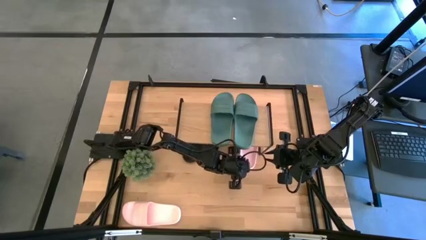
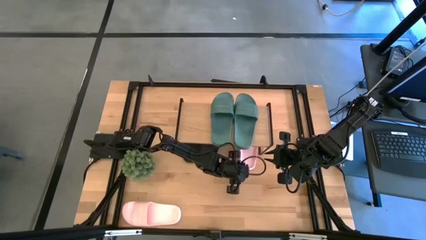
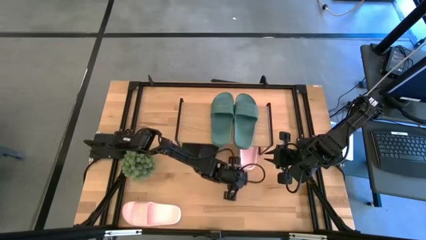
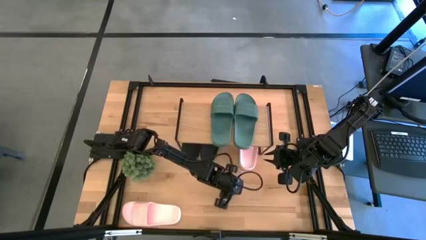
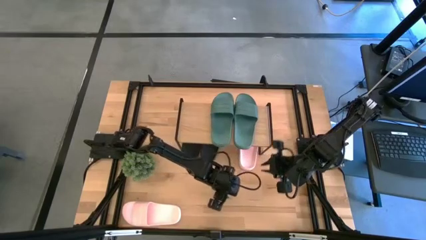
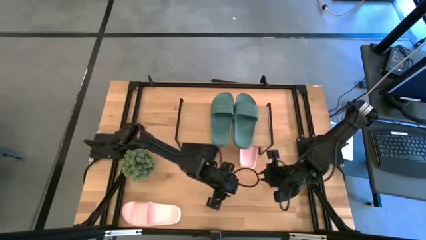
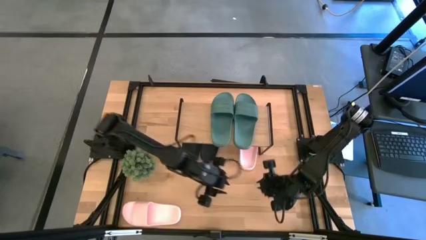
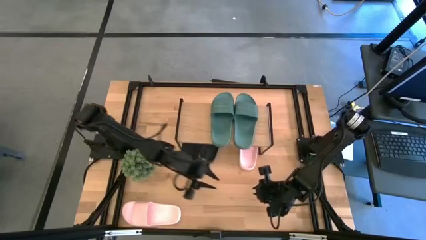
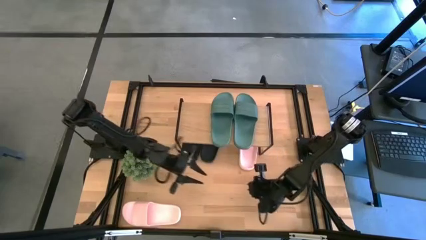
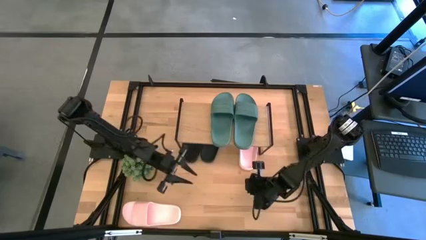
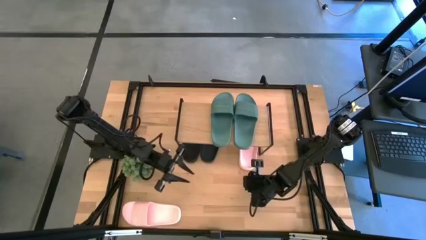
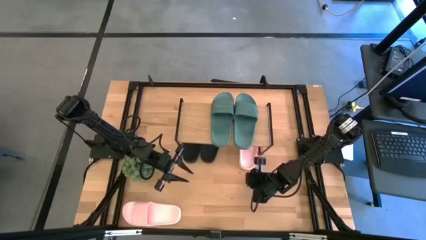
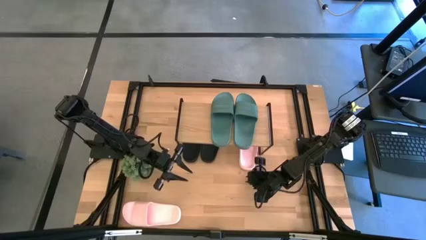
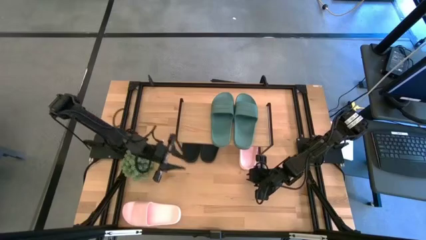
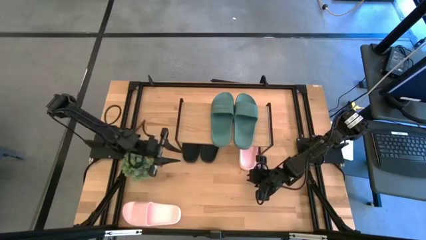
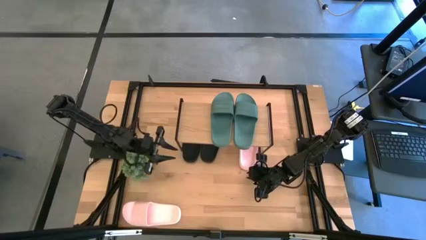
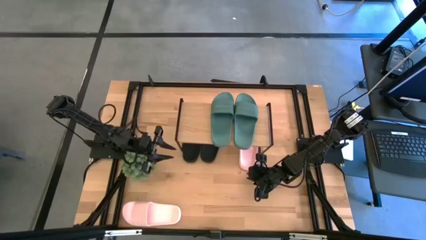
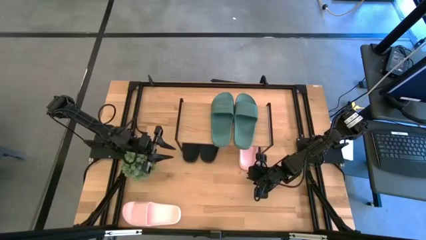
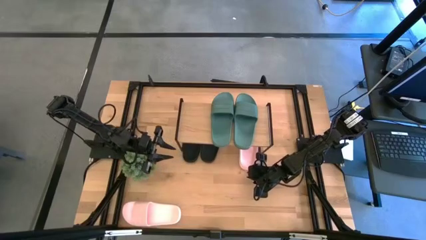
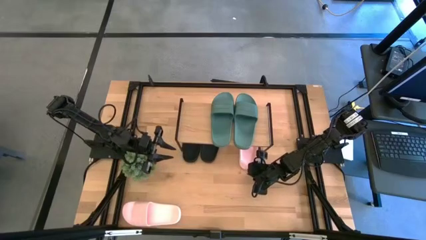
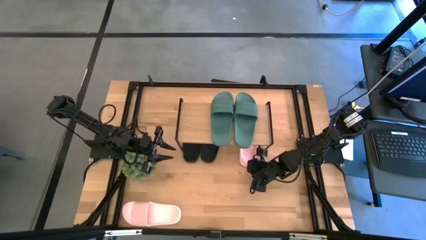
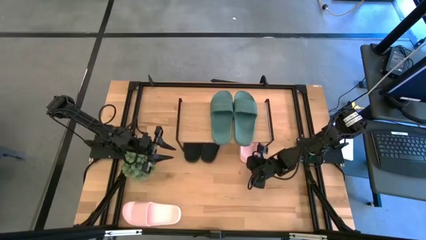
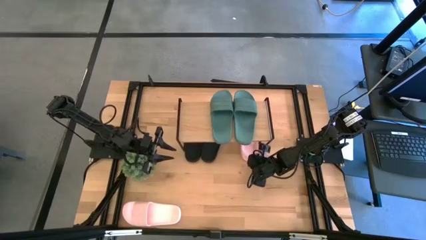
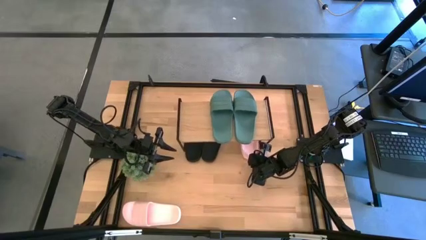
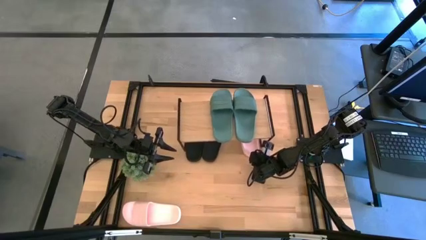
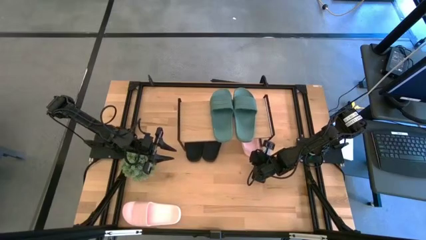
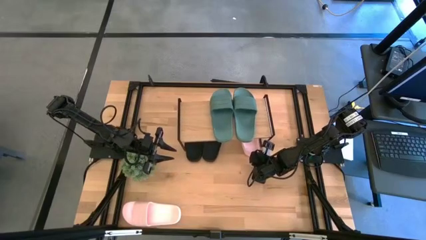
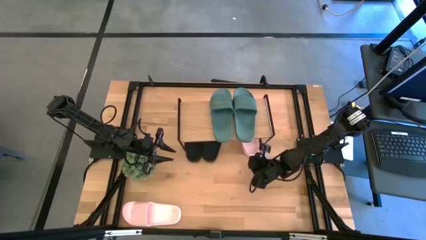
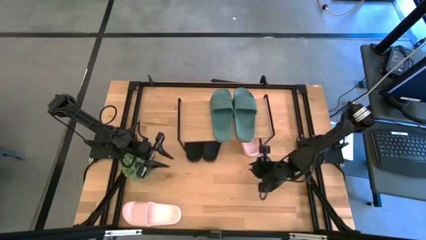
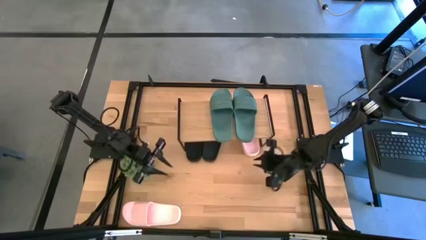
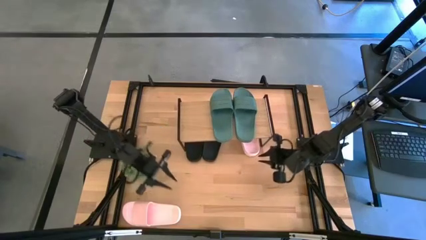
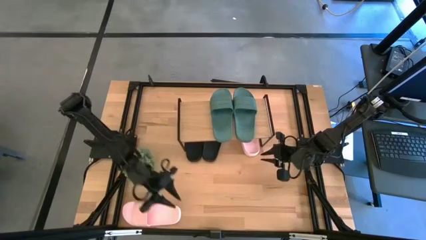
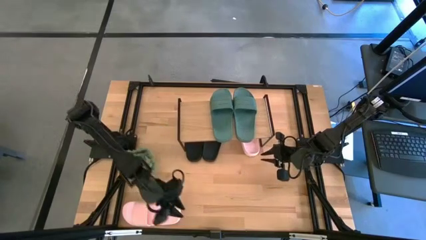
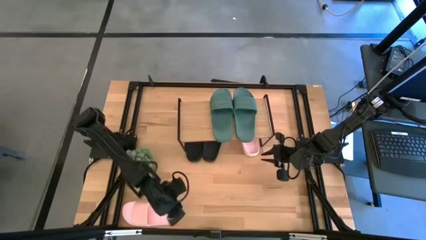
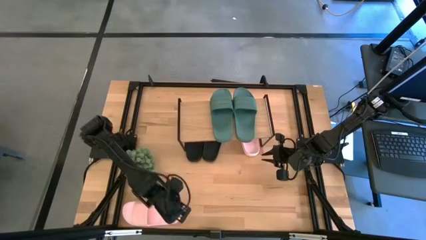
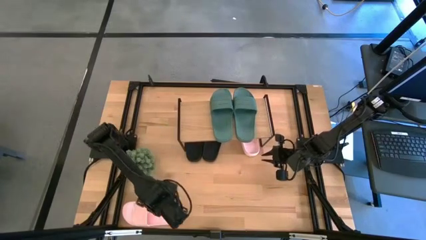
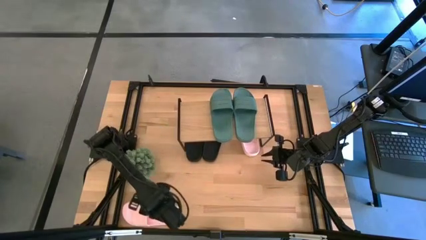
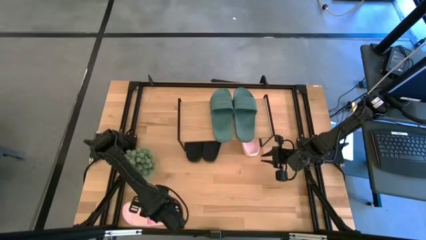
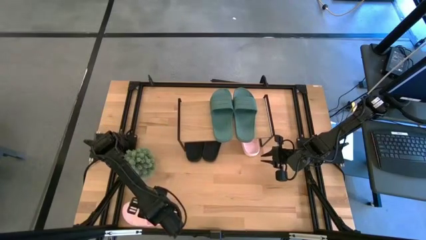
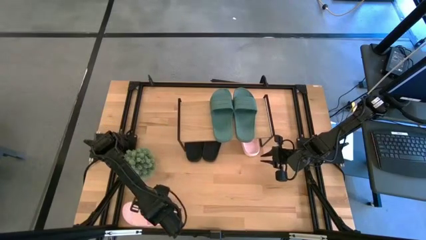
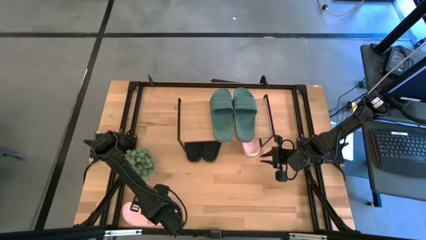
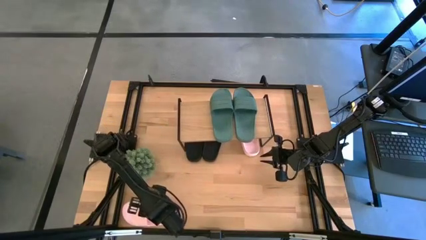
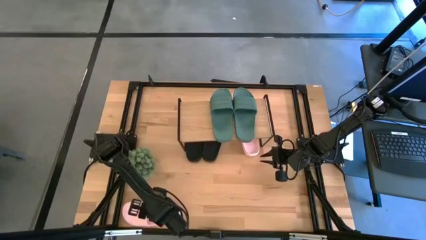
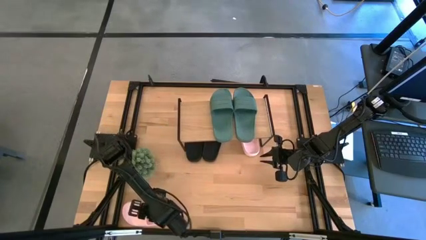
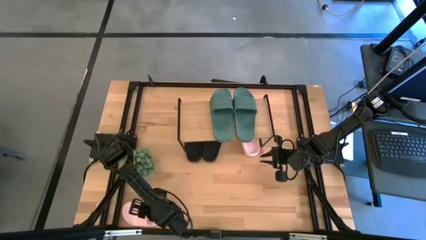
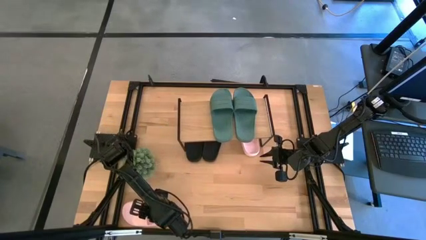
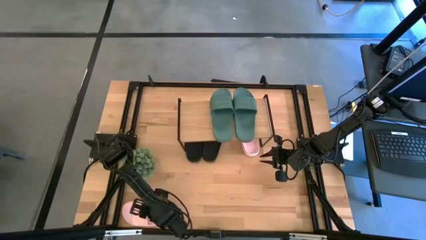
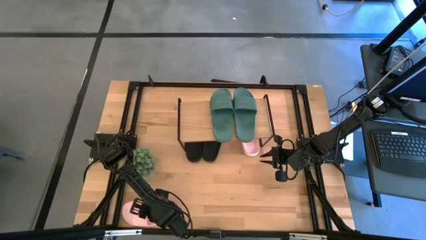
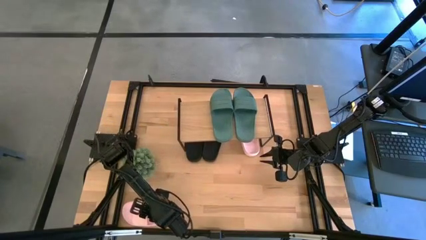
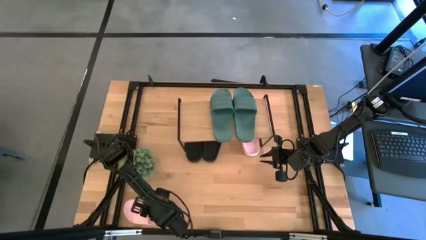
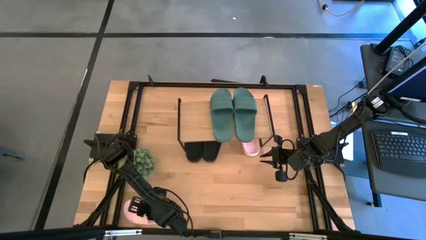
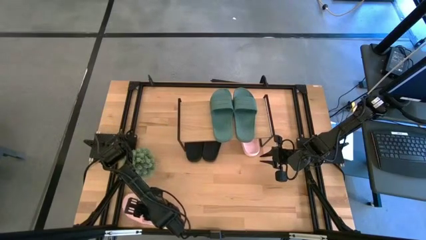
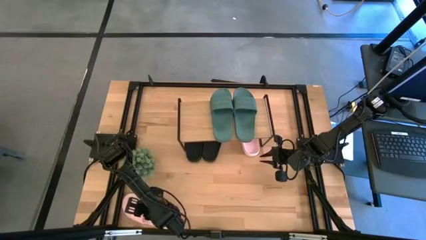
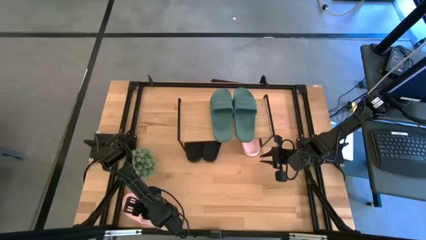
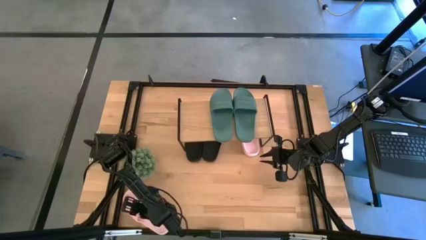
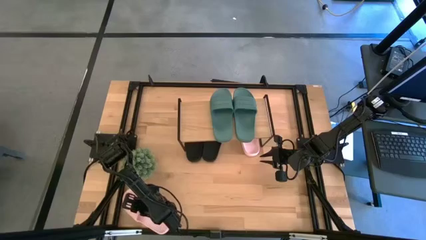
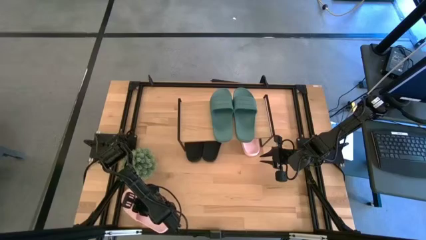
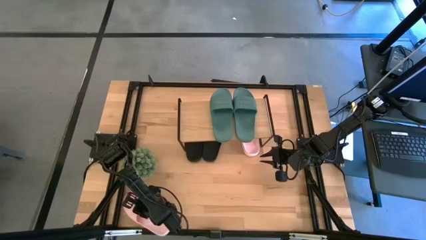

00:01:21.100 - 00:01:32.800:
Task: Pick and place slides into the shelf
Put the pink slipper under the shelf

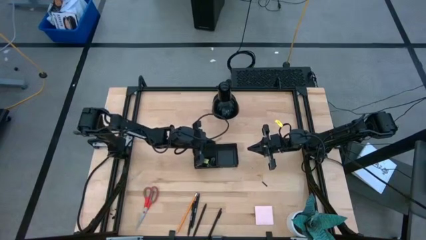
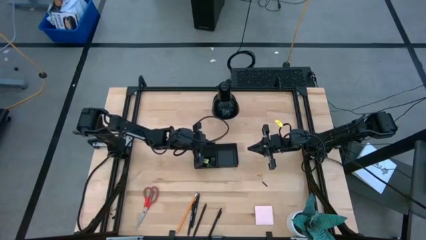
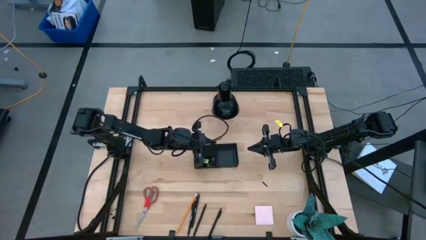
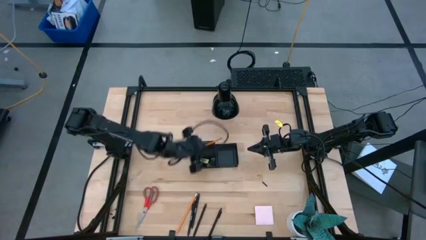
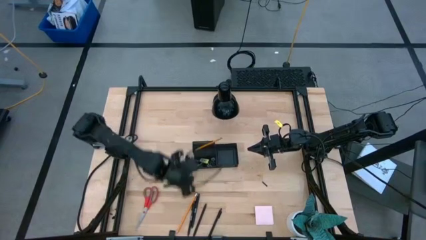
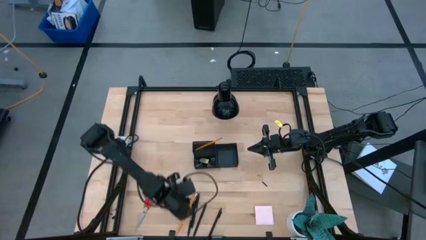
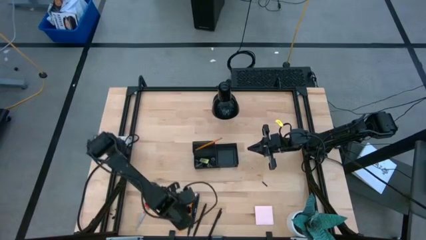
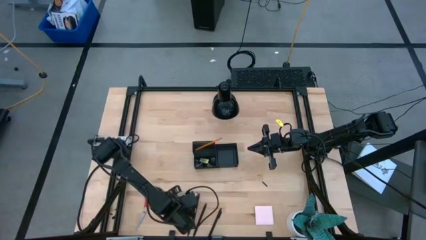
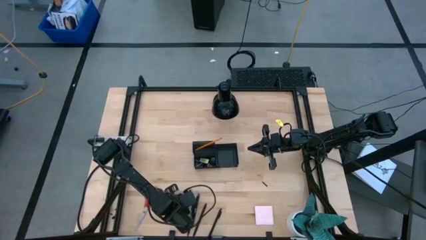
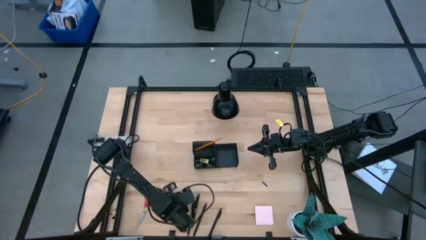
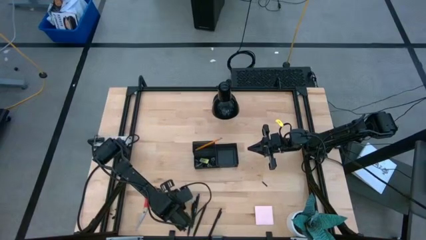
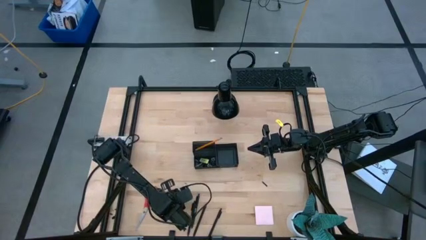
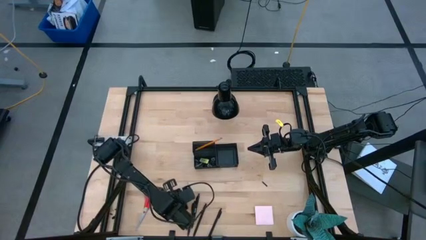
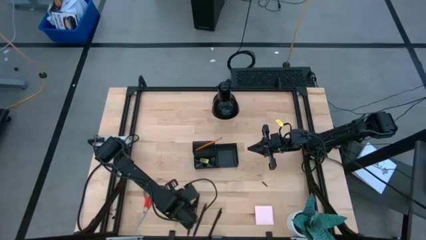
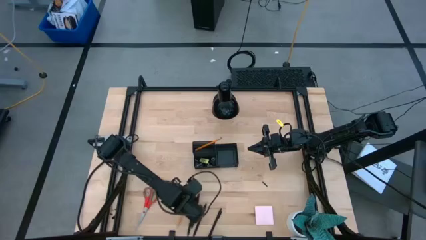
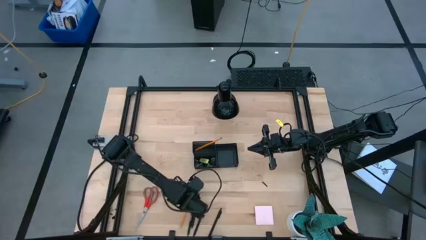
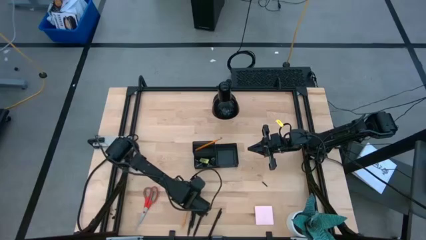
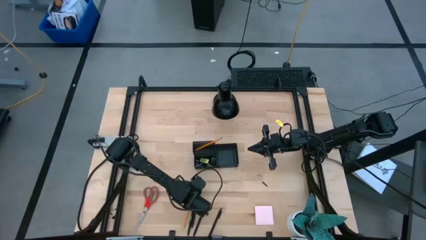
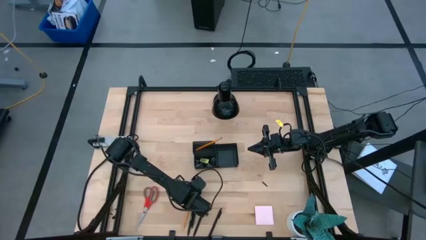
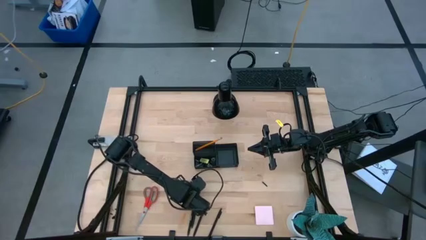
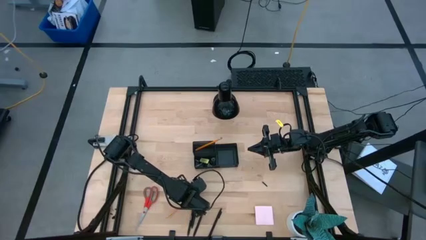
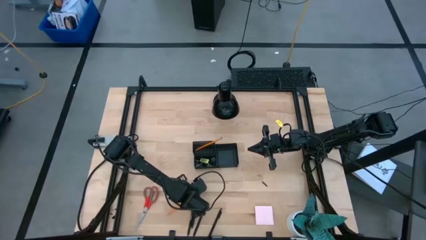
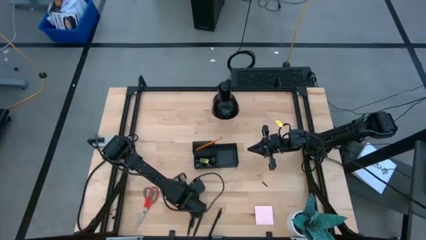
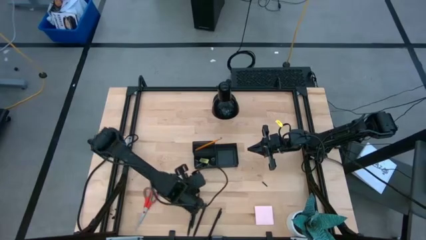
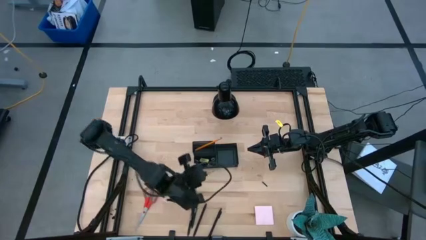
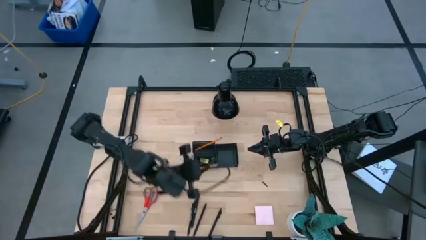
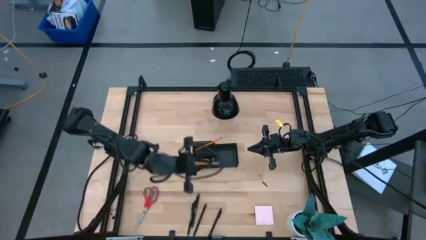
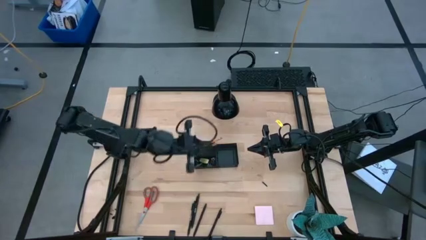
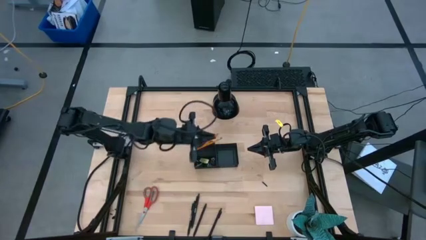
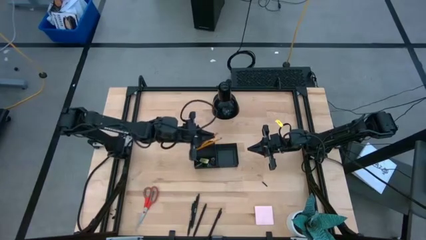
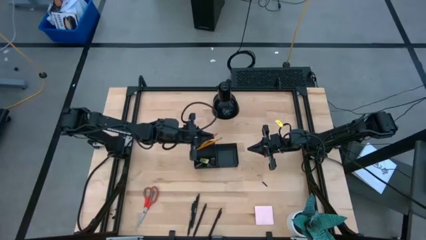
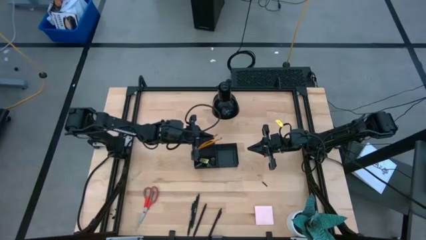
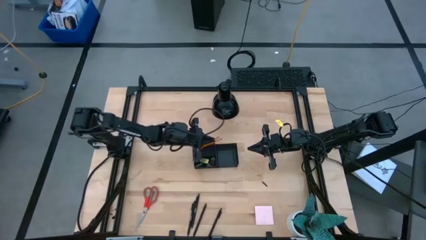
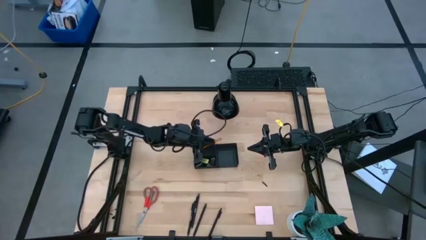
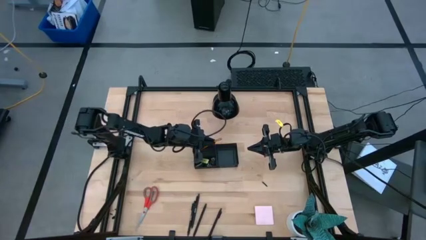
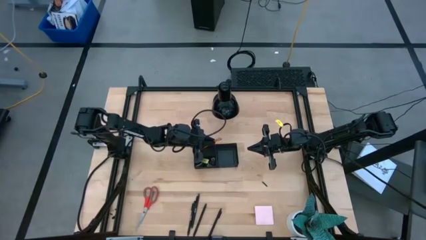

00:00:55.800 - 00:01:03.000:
Task: Pick and place office supplies into organizer
Put the pencil into the top left section of the desk organizer
